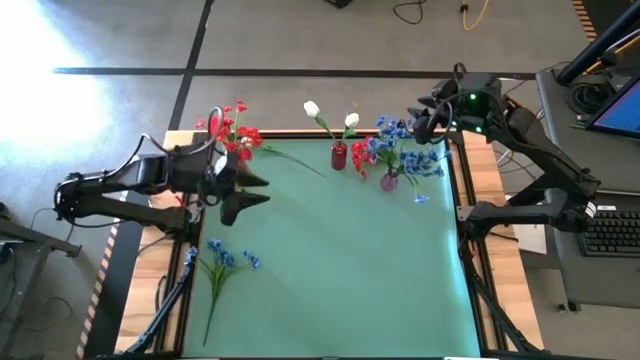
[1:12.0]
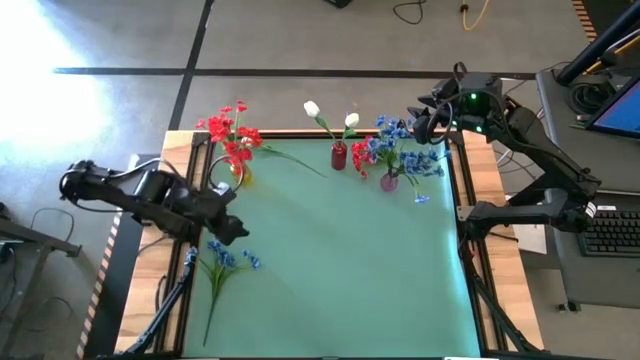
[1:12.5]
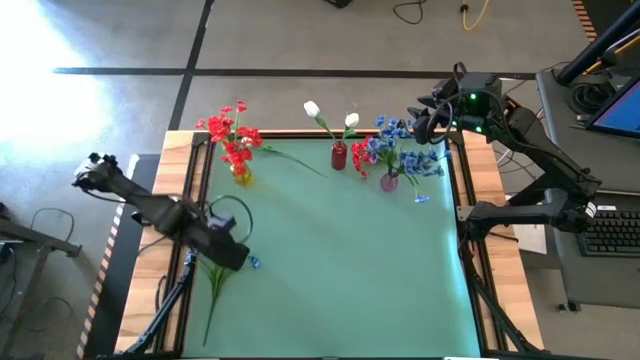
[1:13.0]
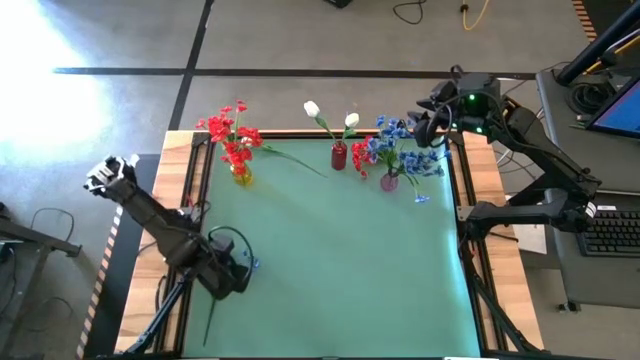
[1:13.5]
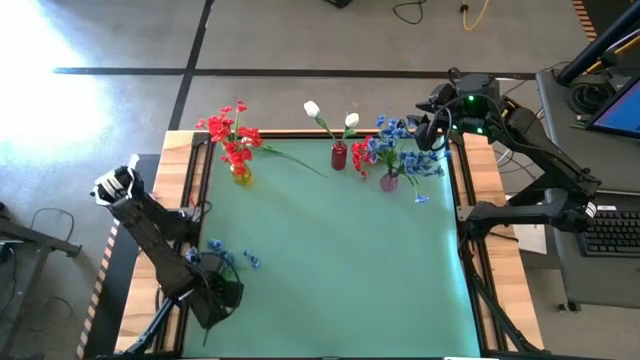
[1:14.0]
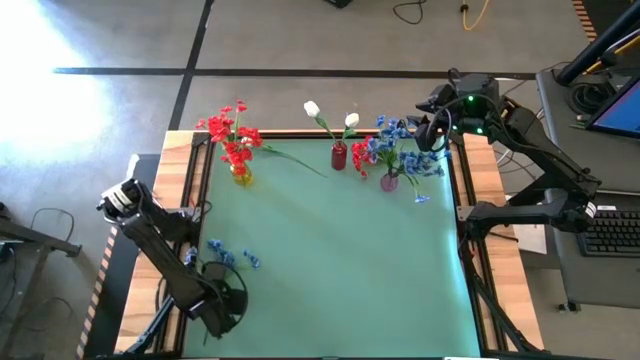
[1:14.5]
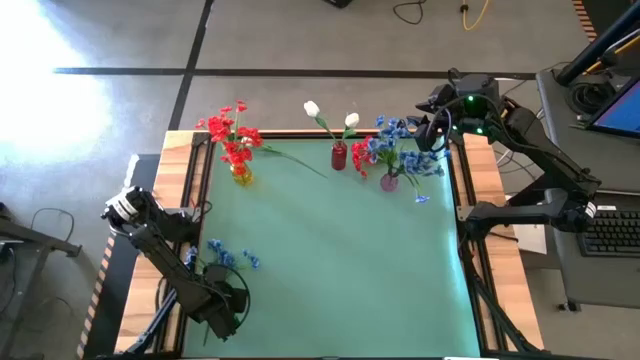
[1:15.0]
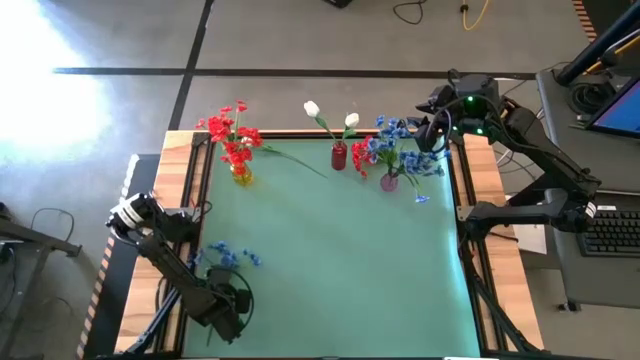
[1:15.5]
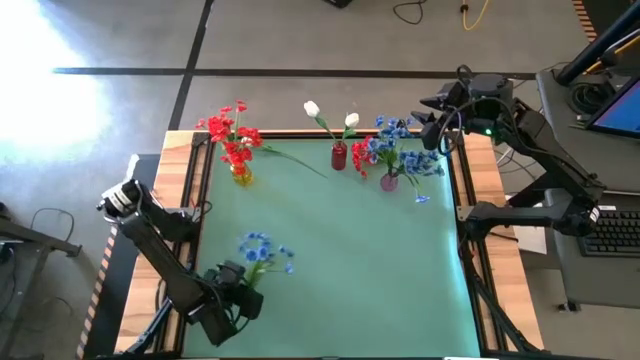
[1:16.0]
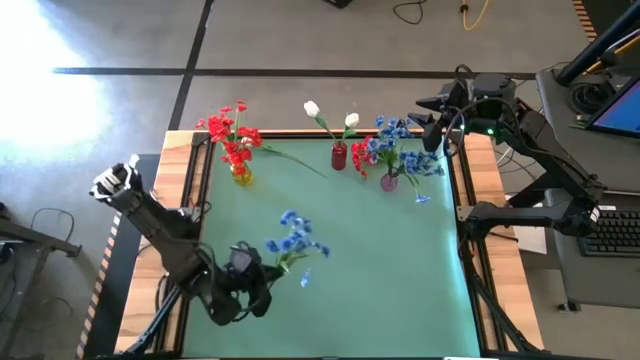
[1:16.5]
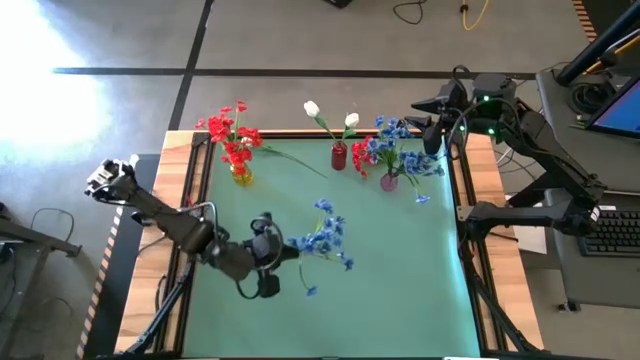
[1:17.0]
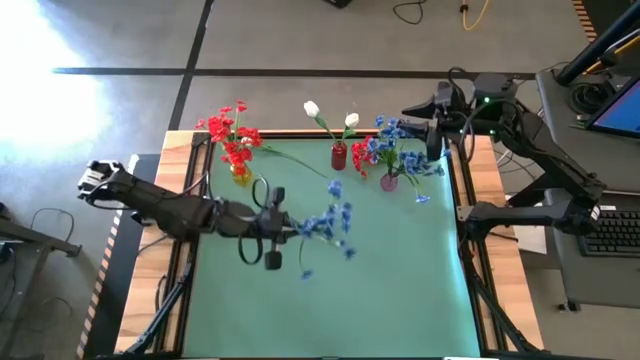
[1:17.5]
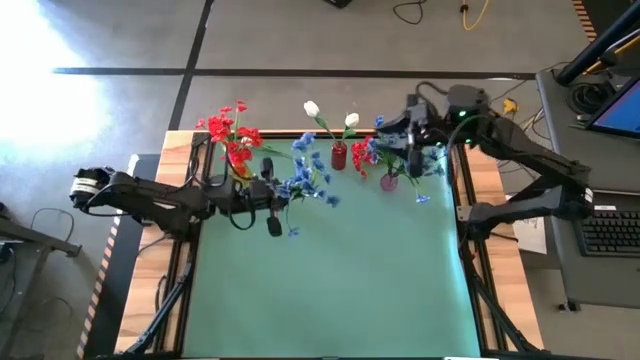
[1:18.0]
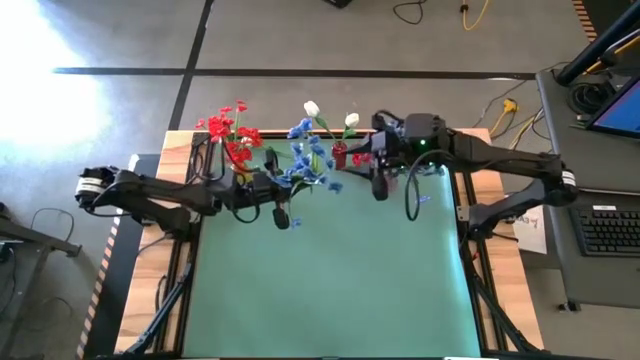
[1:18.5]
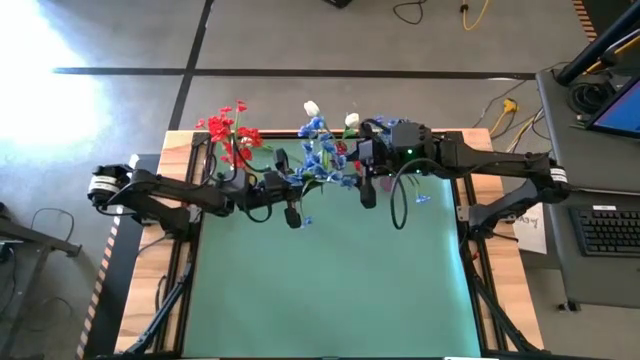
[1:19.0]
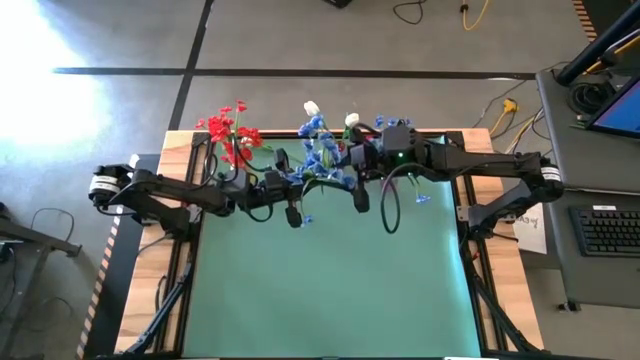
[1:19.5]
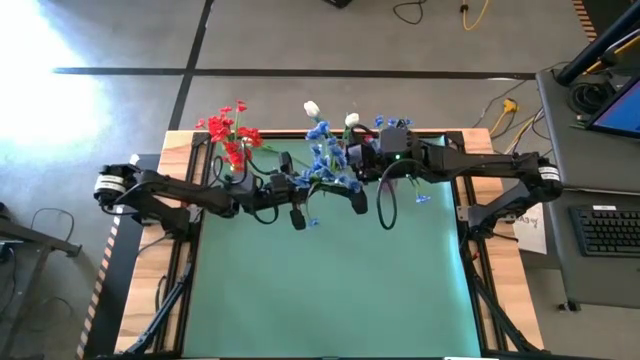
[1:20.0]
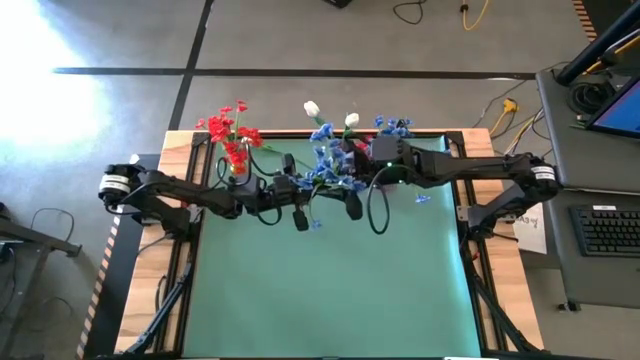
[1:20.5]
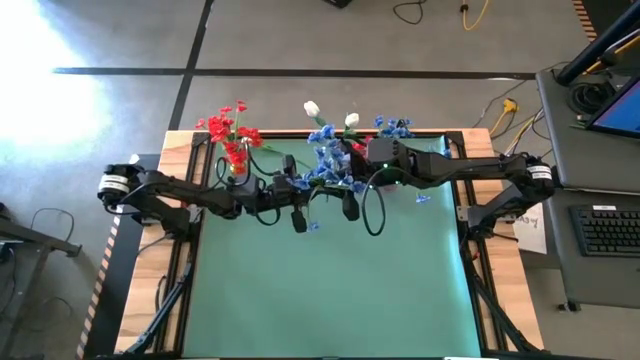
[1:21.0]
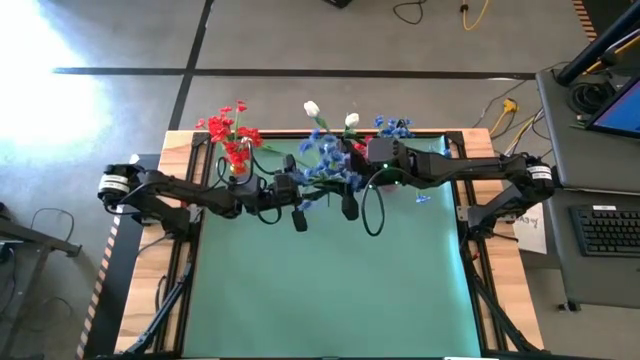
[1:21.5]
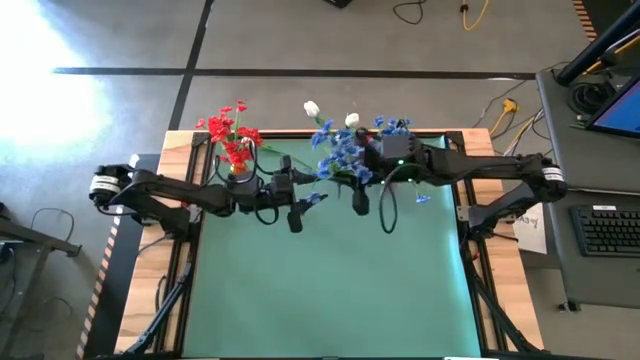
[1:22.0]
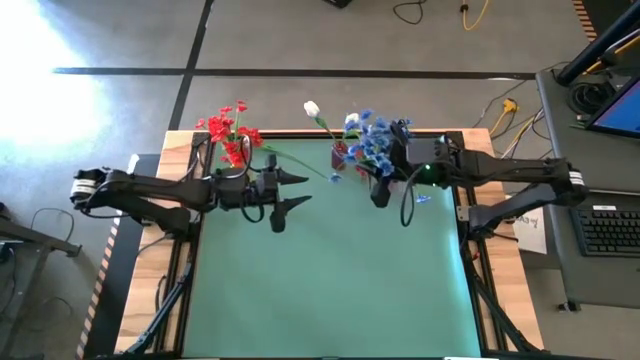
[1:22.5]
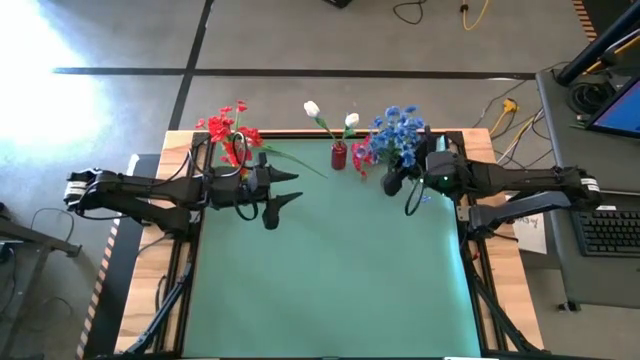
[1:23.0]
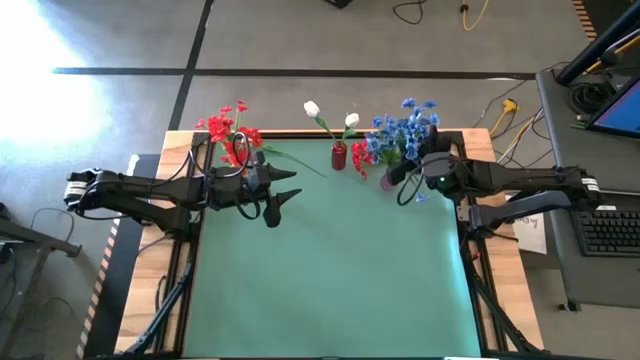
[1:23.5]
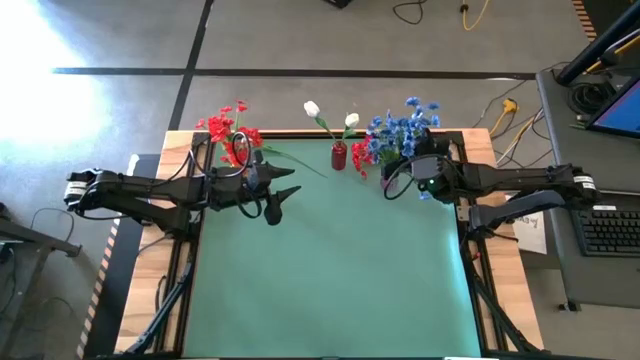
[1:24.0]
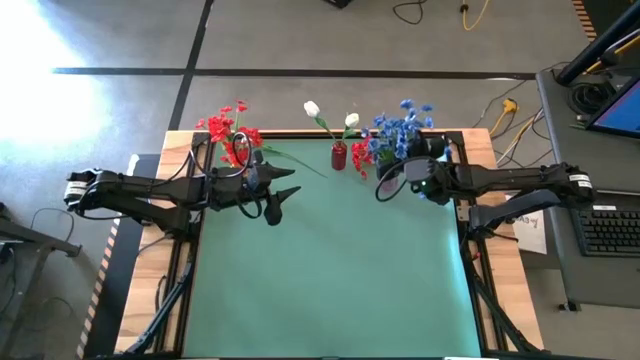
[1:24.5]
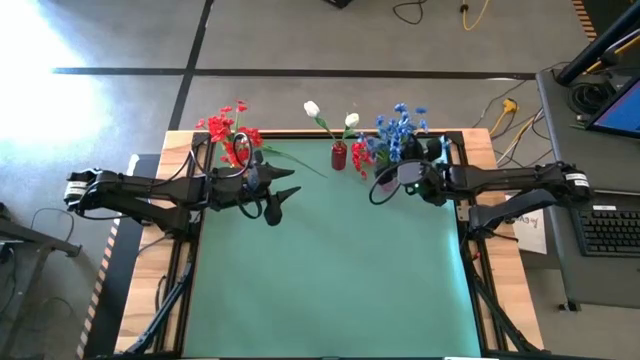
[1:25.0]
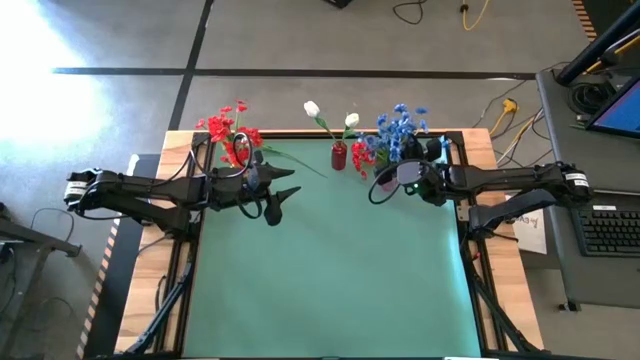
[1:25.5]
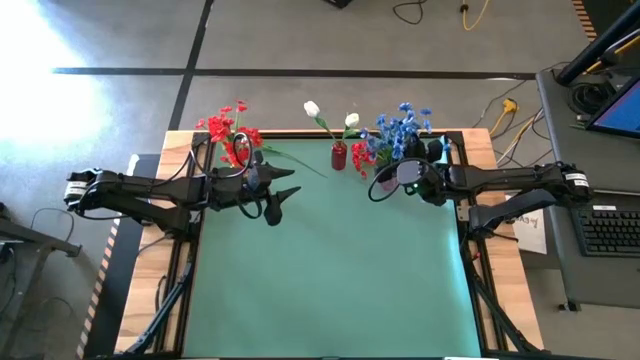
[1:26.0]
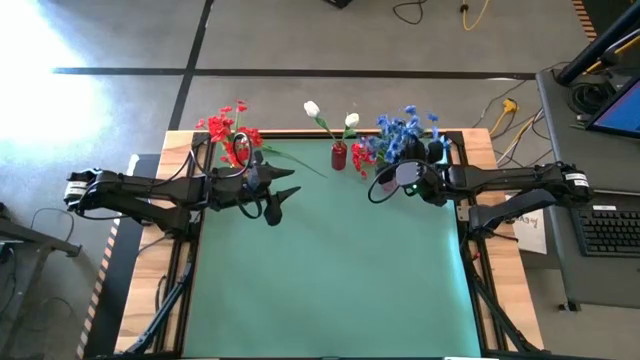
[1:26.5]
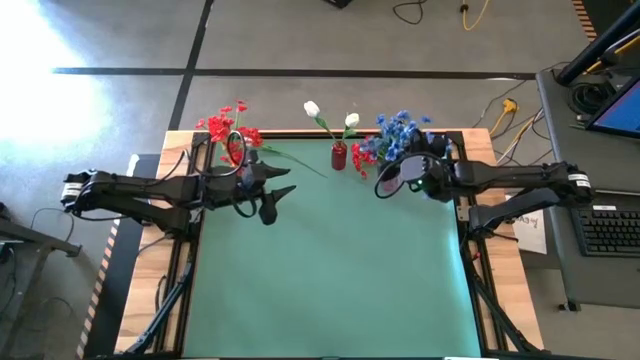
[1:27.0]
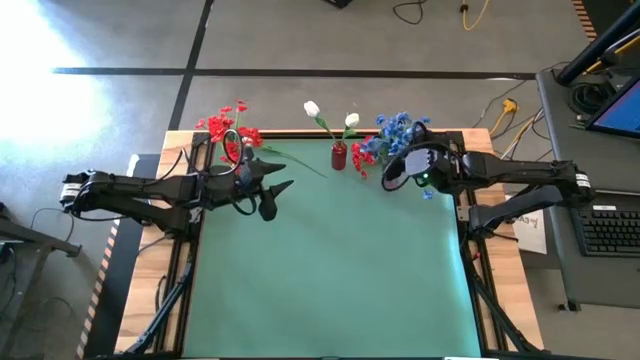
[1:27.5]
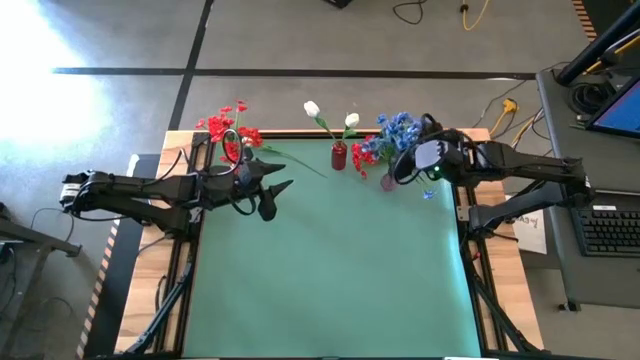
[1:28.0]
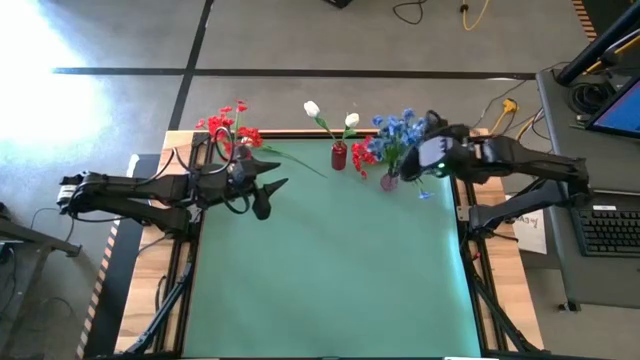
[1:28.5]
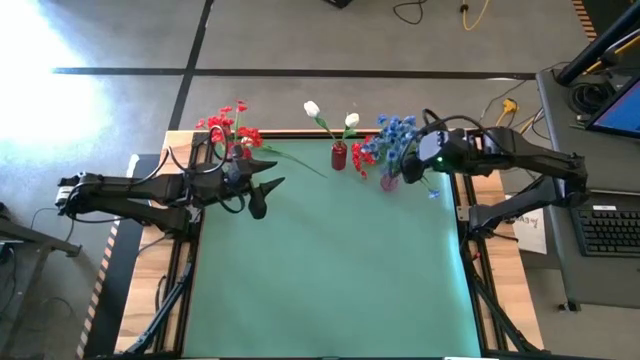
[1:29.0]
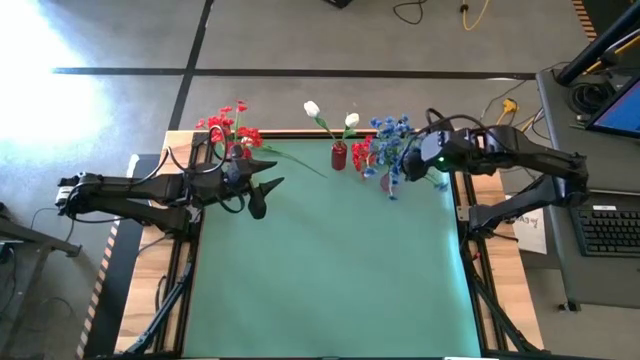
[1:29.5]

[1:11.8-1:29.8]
Task: Sort flowers into vase by color
Put the blue flower into the violet vase
